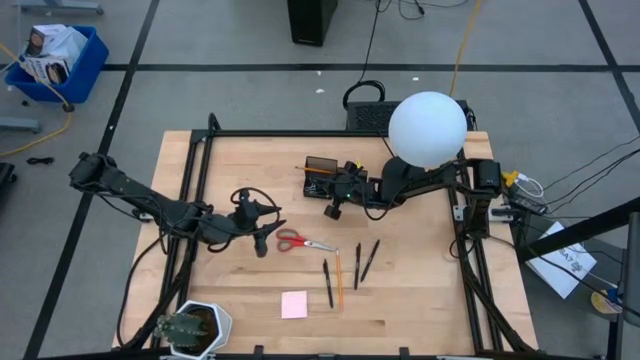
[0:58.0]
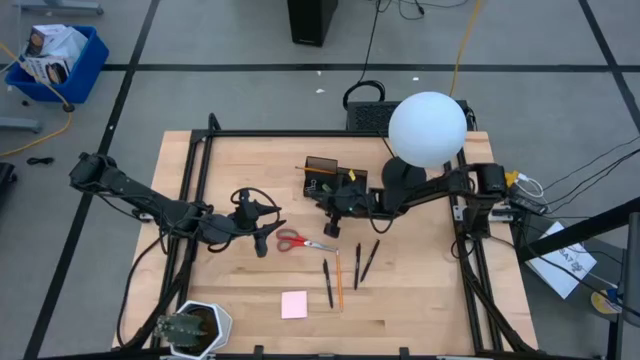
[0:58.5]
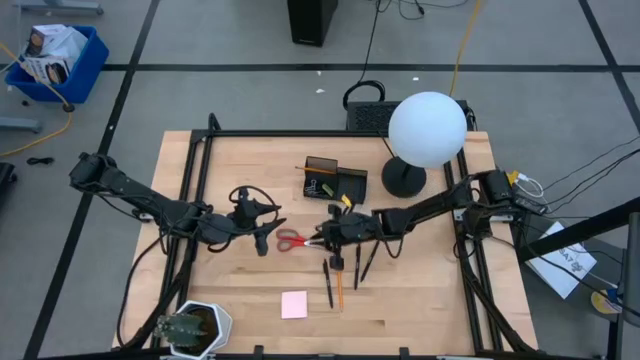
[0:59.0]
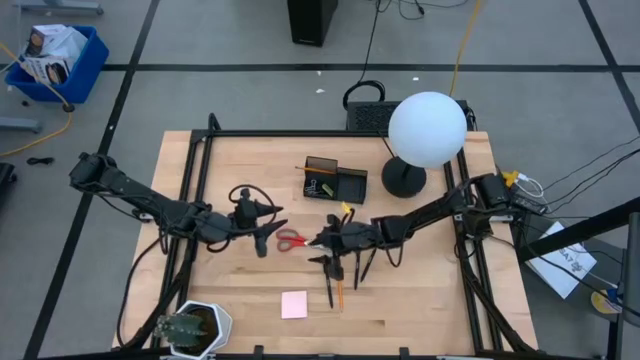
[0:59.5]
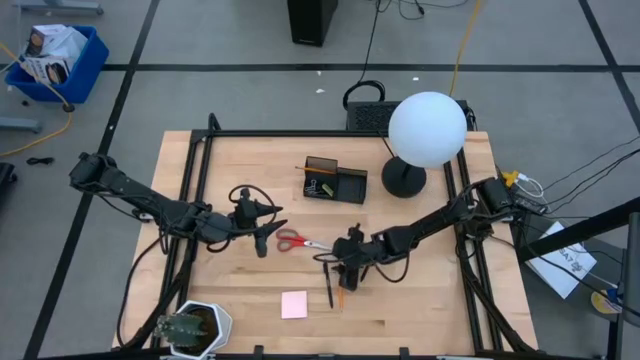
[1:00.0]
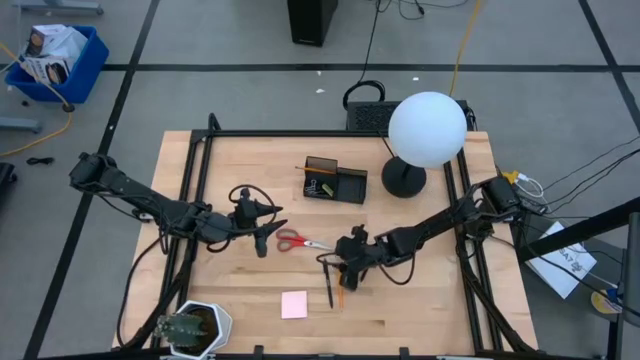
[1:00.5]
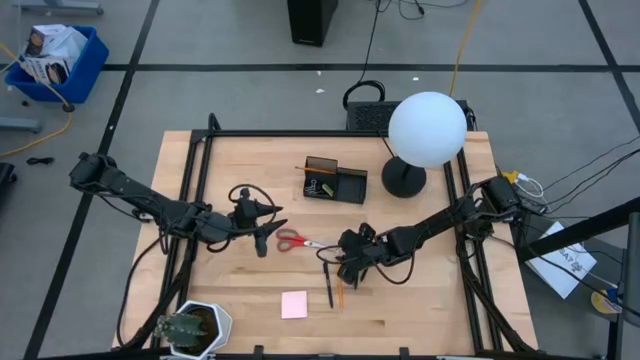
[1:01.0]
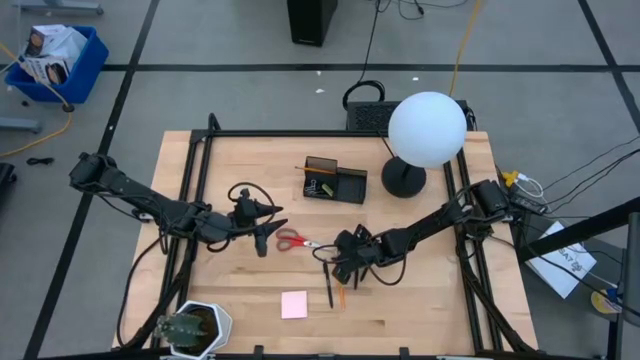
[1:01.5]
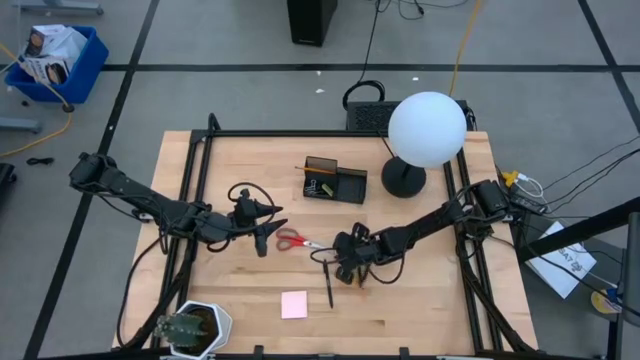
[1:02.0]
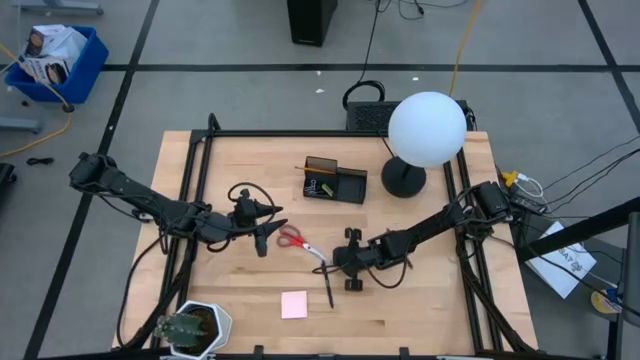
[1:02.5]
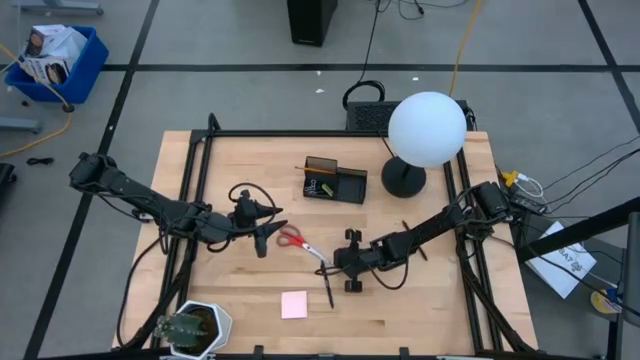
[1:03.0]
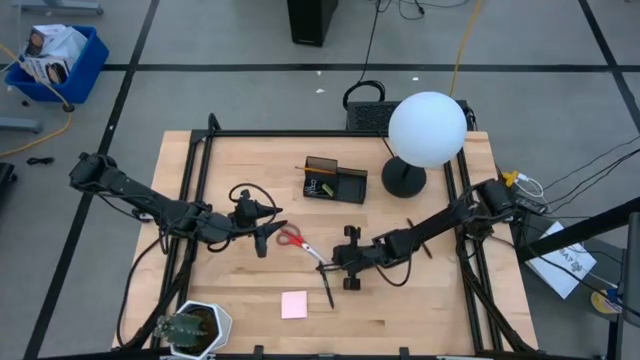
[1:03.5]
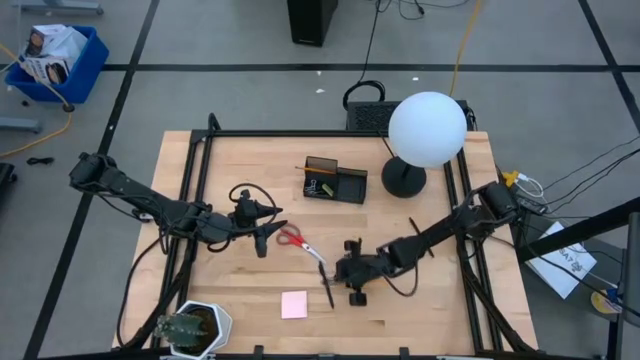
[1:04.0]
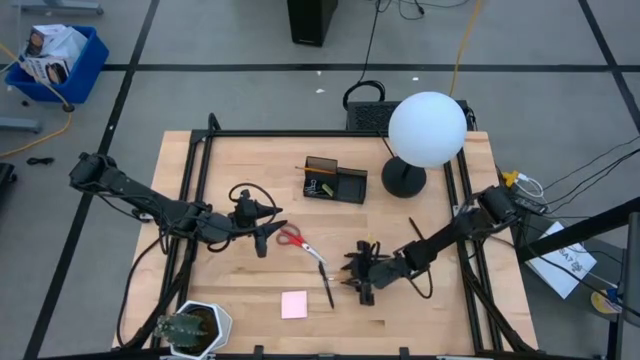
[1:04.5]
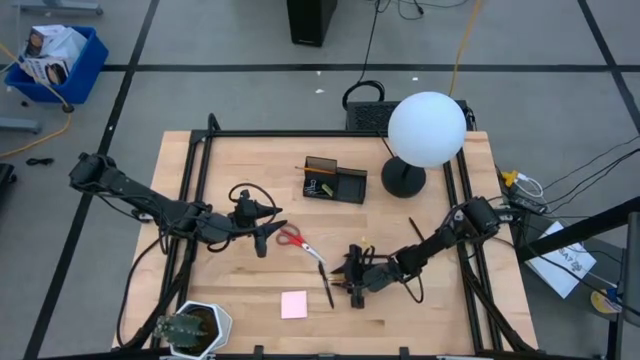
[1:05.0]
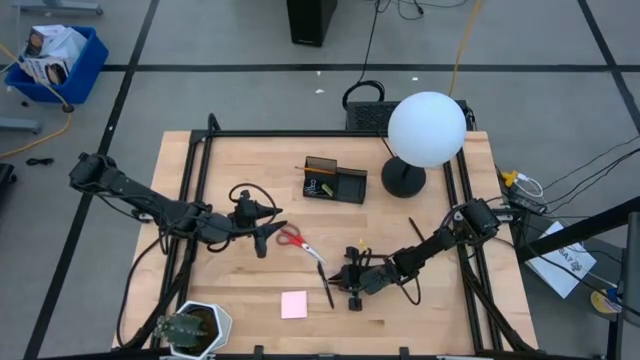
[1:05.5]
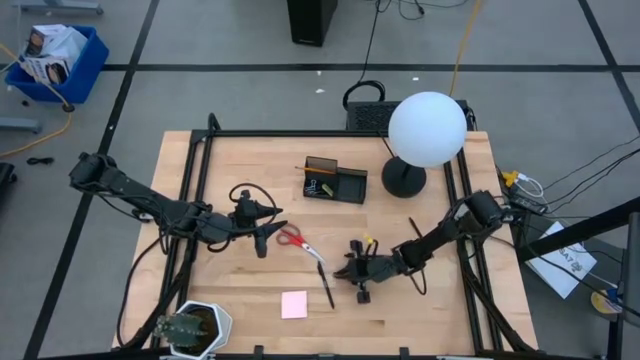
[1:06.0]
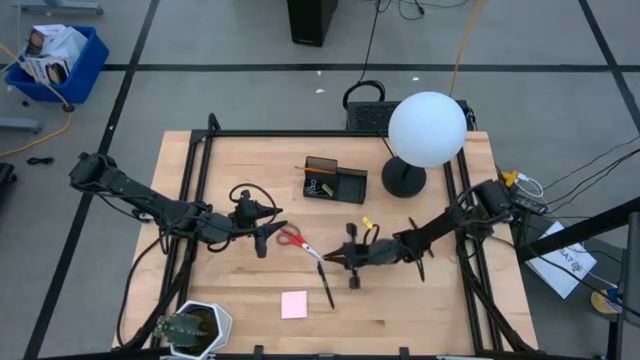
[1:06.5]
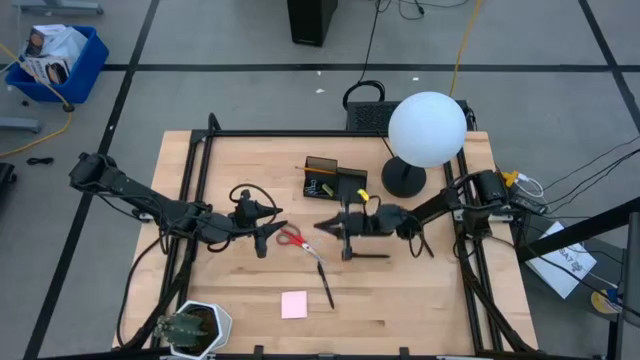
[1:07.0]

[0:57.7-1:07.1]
Task: Pick and place office supplies into organizer
Put the yellow pencil into the black desk organizer

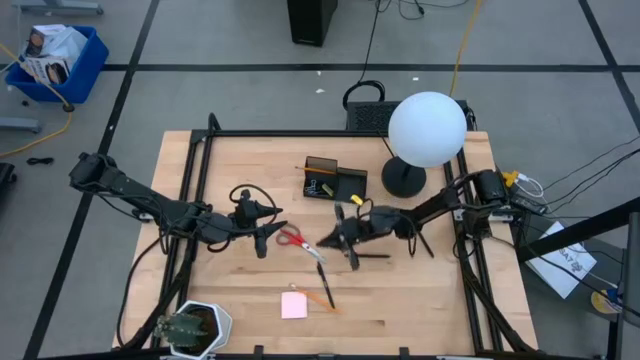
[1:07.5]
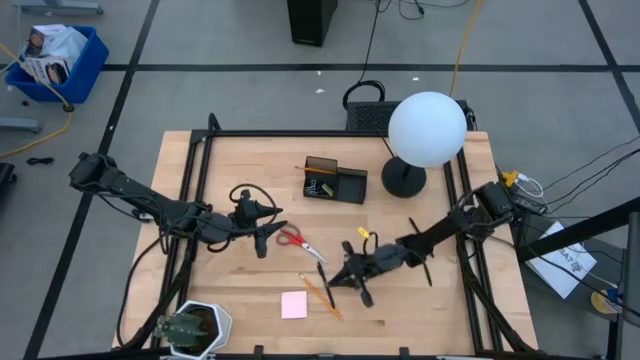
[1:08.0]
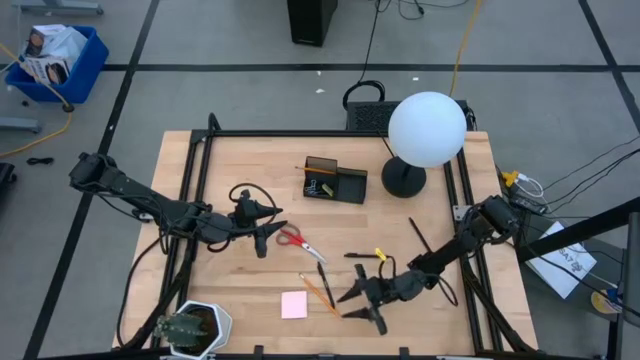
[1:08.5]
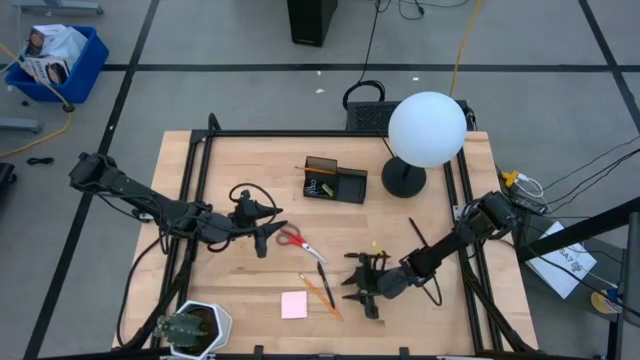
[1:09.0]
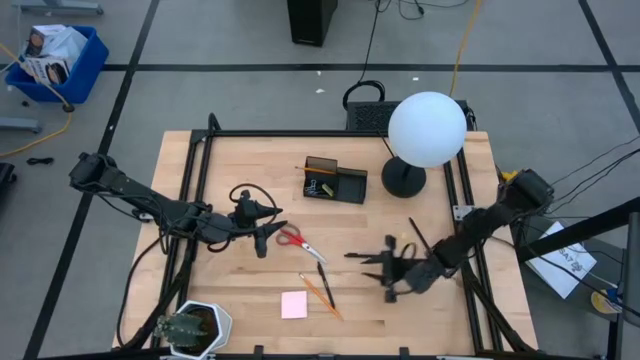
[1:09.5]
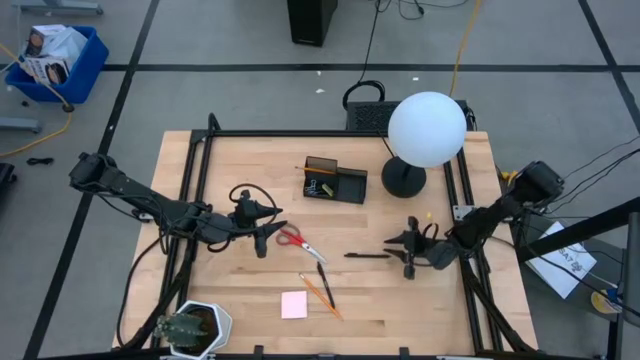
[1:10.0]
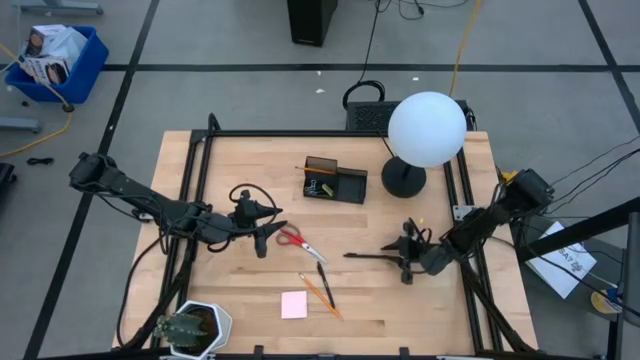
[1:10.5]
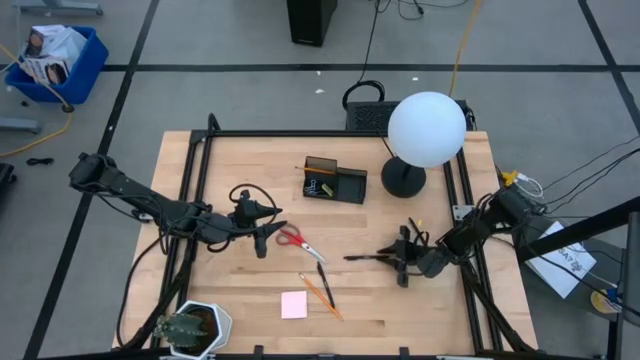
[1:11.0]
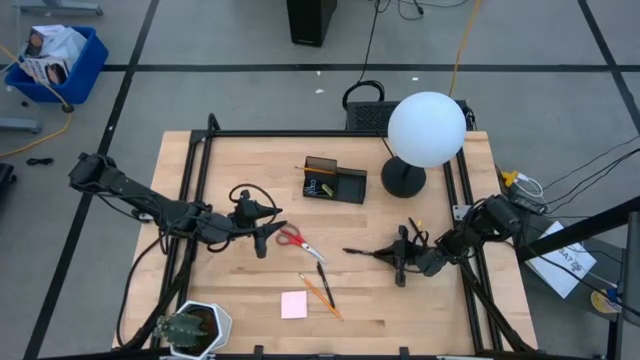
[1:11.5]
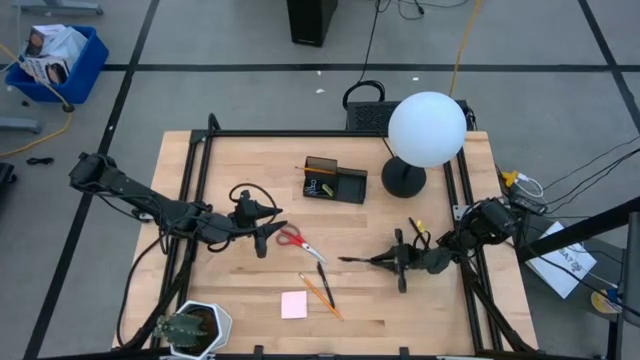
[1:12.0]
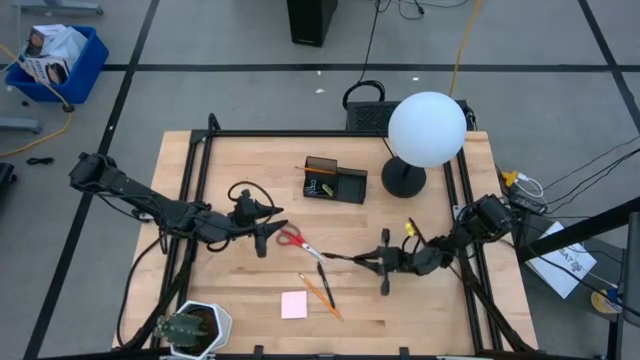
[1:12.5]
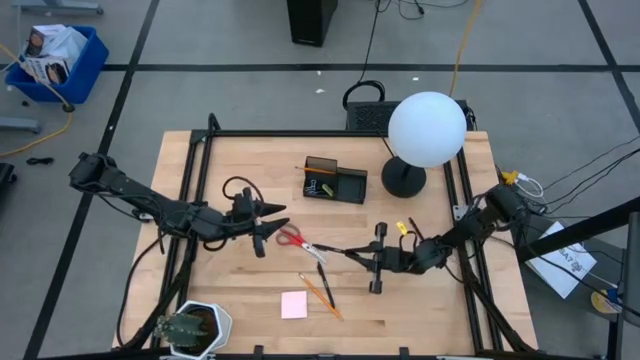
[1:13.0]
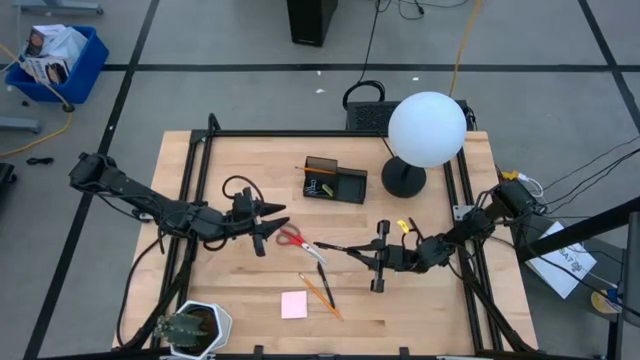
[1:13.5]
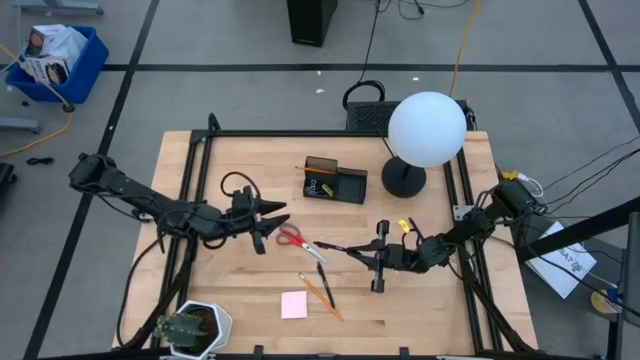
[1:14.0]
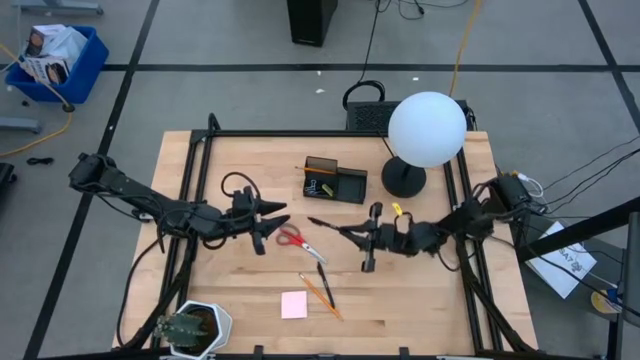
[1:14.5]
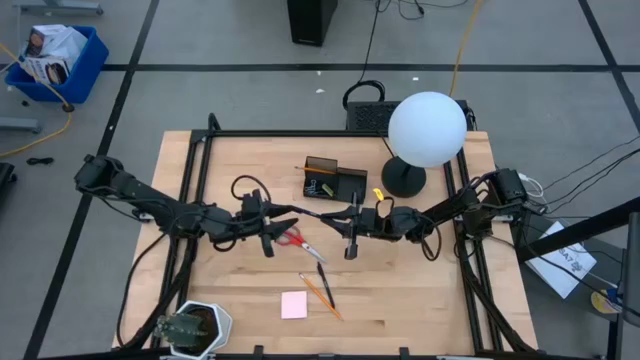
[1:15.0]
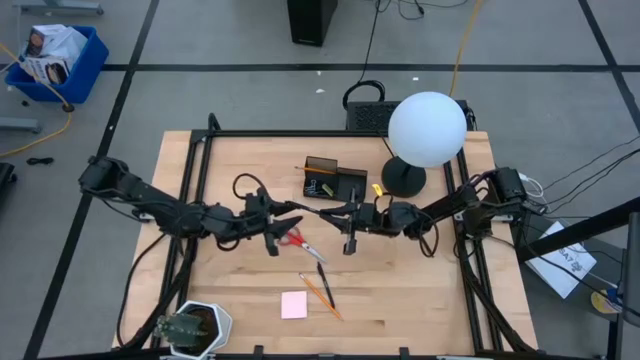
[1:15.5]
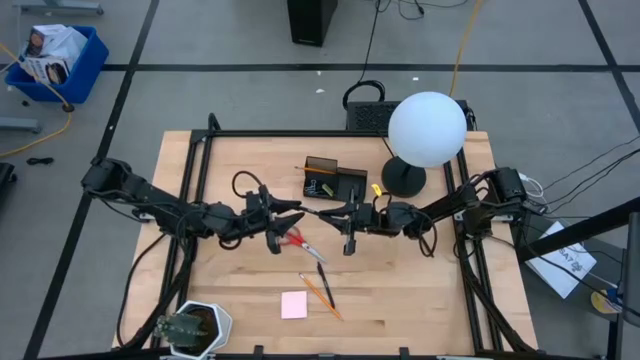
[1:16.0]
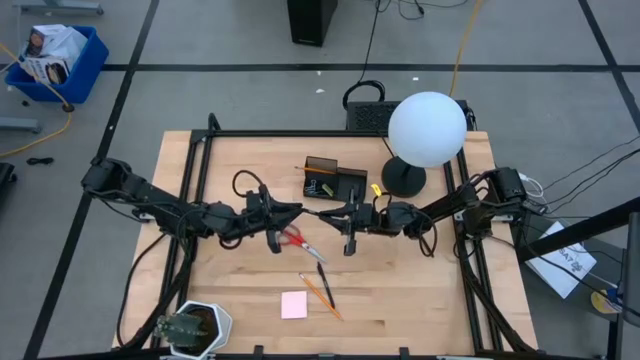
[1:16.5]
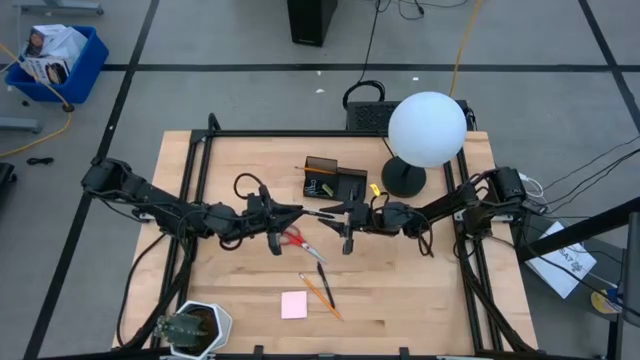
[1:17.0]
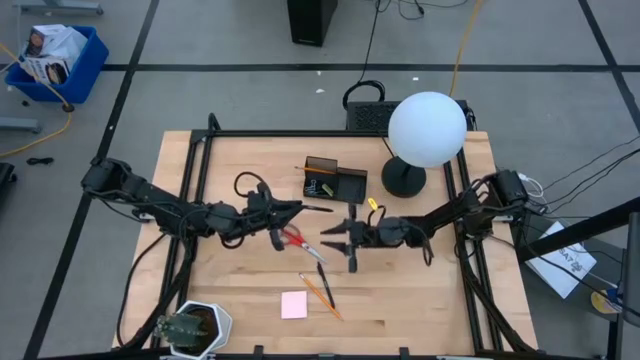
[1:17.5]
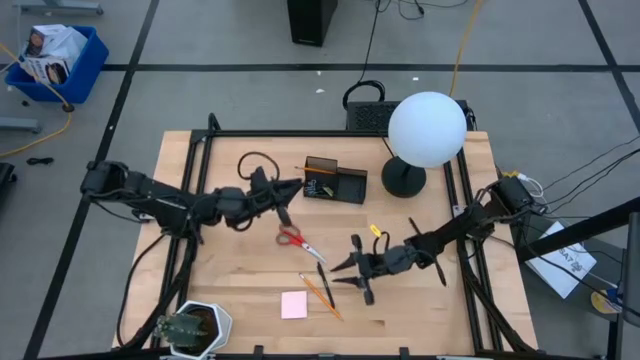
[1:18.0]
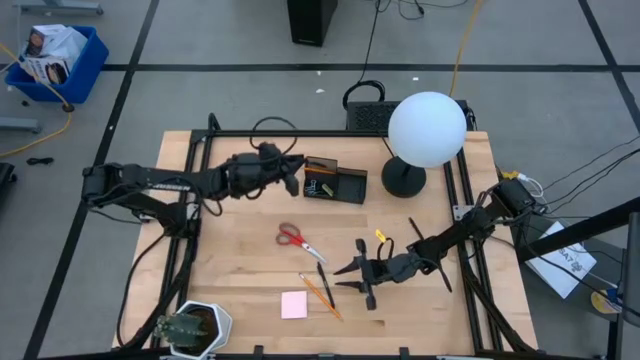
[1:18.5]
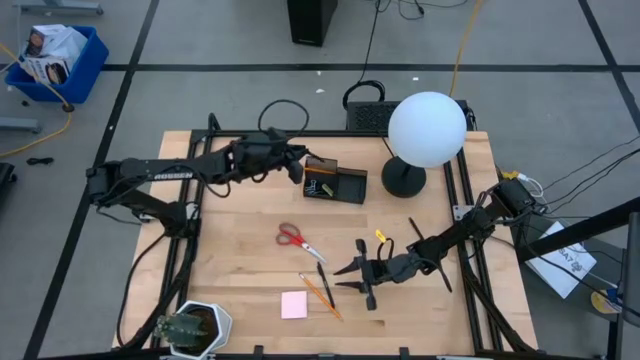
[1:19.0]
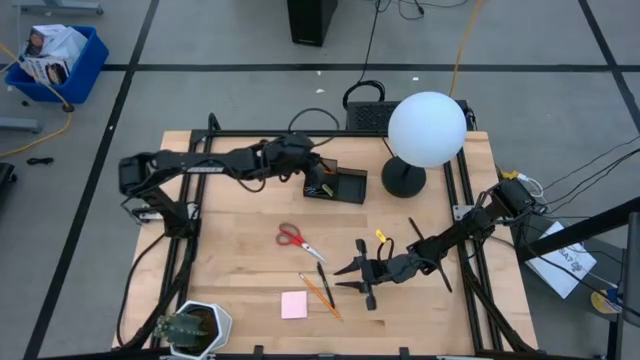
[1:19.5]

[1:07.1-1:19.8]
Put the middle black pen into the black desk organizer
